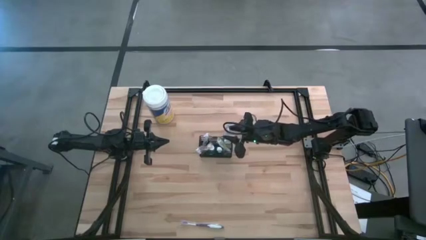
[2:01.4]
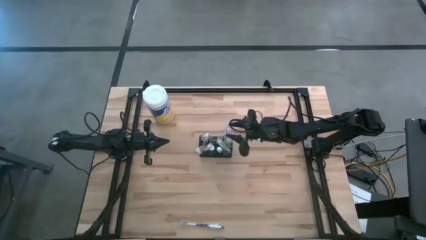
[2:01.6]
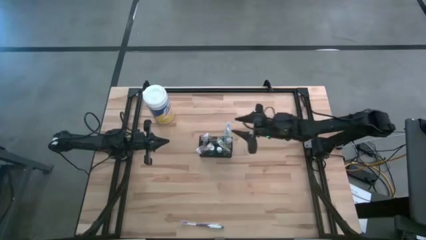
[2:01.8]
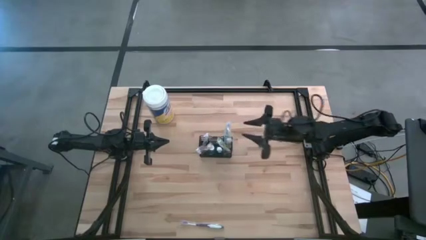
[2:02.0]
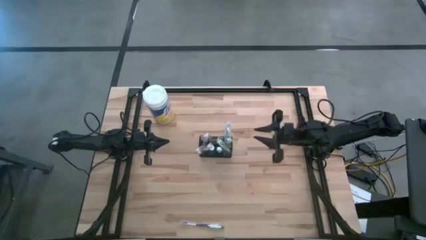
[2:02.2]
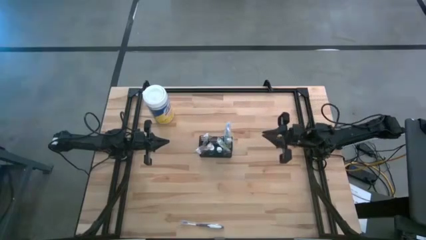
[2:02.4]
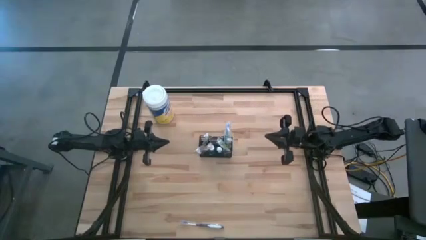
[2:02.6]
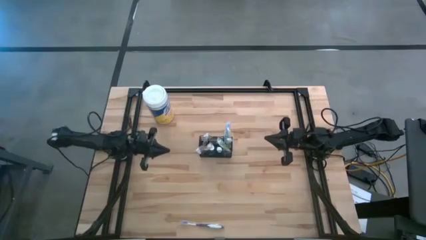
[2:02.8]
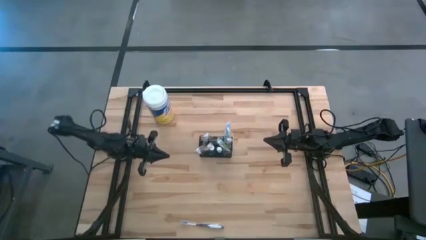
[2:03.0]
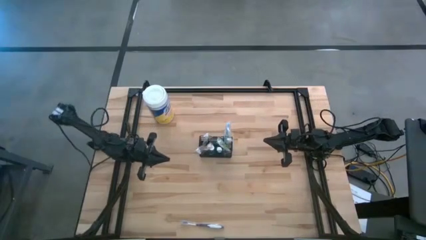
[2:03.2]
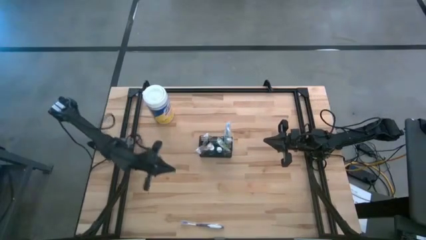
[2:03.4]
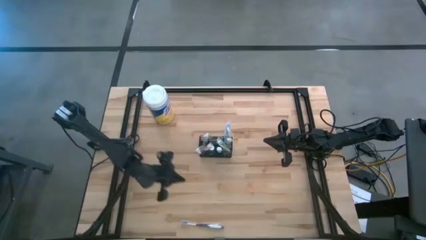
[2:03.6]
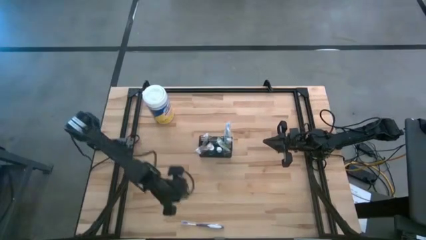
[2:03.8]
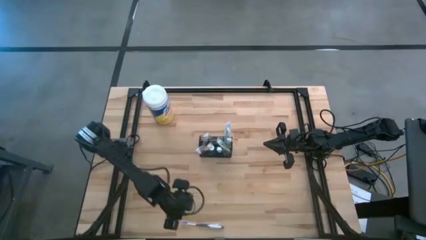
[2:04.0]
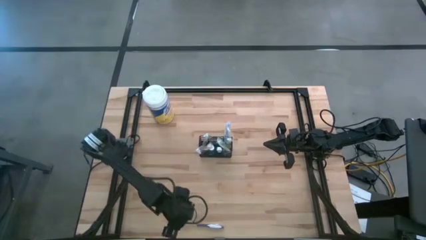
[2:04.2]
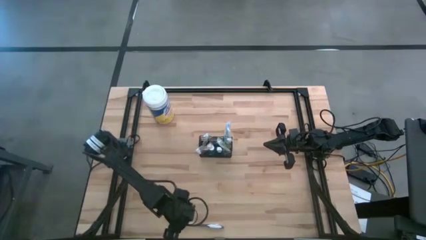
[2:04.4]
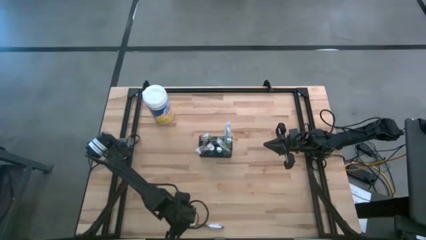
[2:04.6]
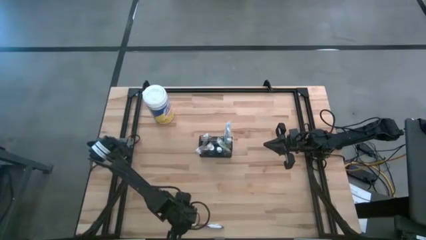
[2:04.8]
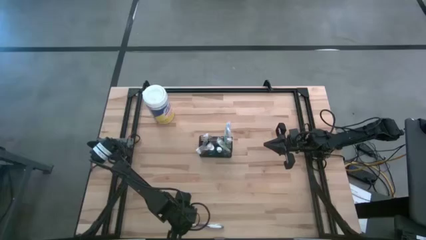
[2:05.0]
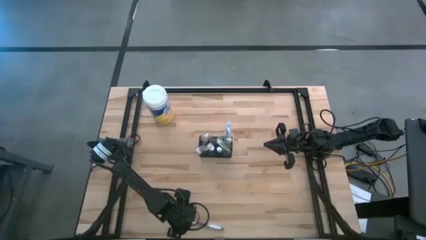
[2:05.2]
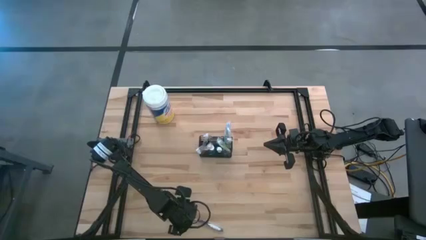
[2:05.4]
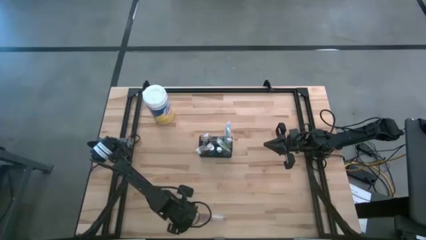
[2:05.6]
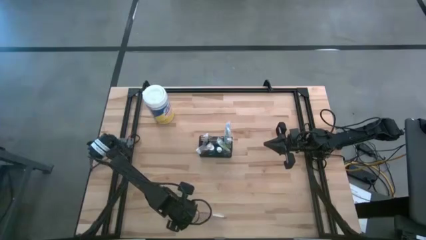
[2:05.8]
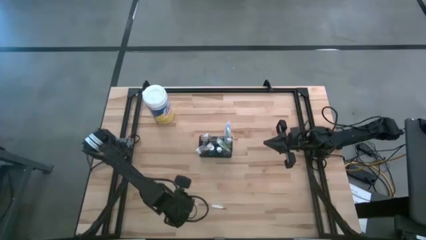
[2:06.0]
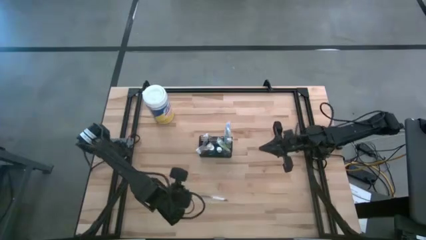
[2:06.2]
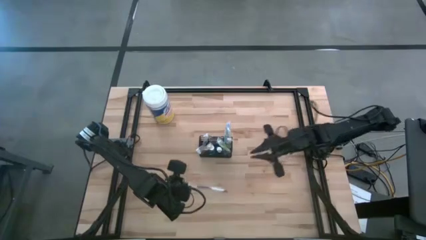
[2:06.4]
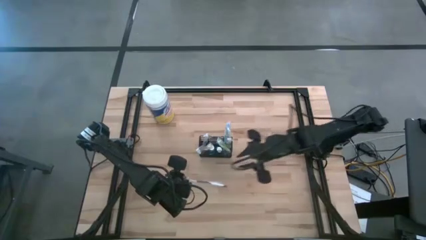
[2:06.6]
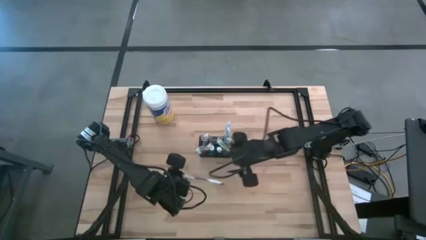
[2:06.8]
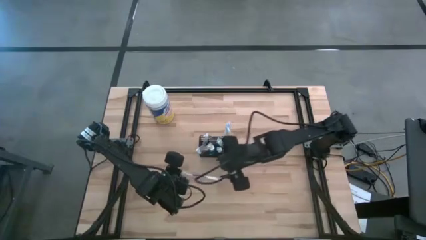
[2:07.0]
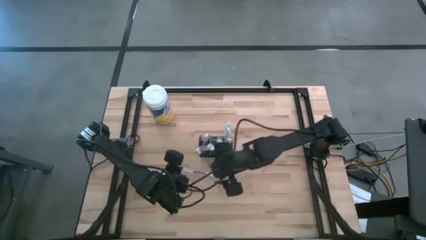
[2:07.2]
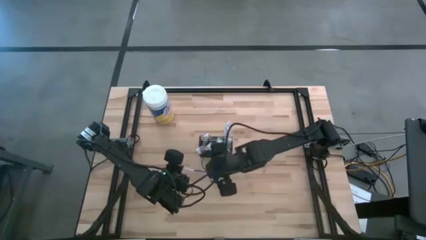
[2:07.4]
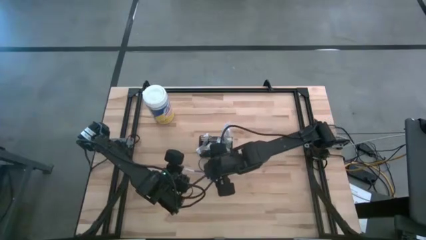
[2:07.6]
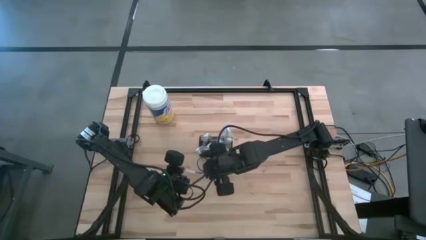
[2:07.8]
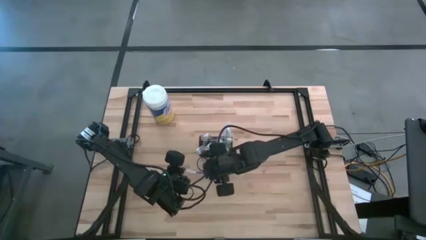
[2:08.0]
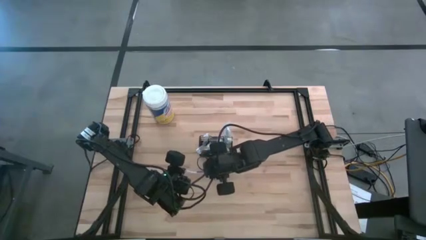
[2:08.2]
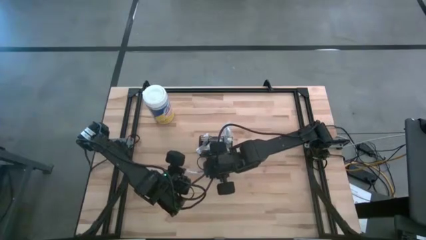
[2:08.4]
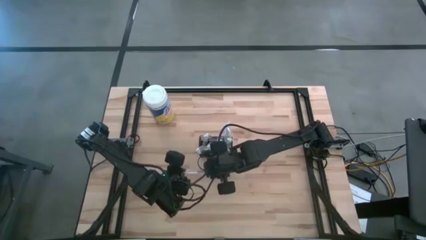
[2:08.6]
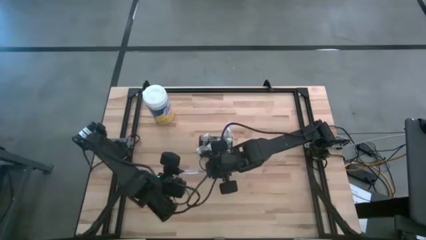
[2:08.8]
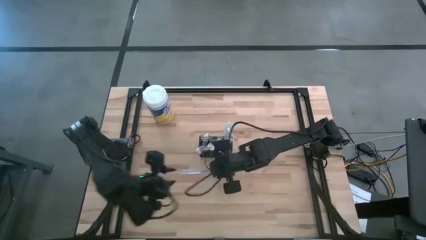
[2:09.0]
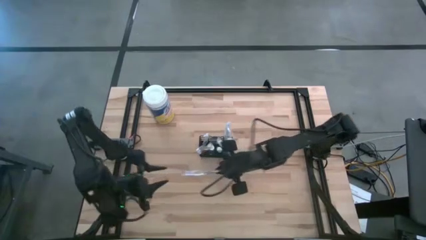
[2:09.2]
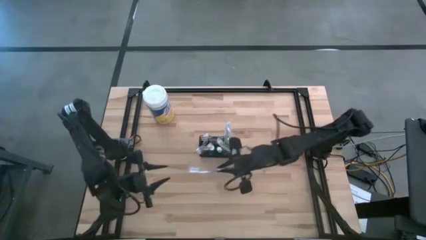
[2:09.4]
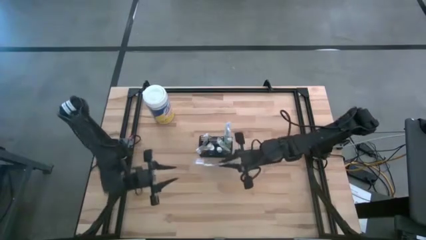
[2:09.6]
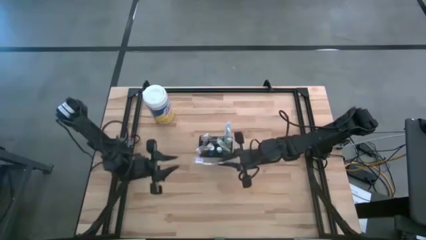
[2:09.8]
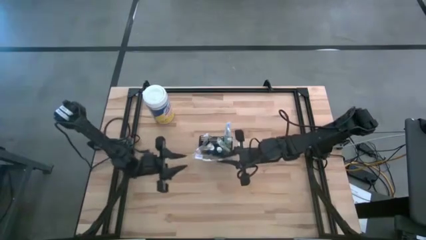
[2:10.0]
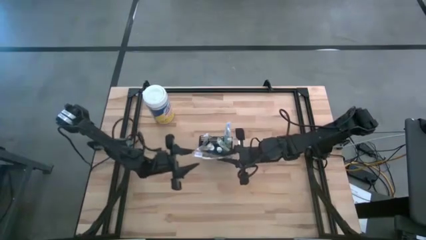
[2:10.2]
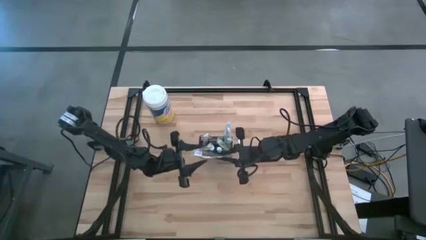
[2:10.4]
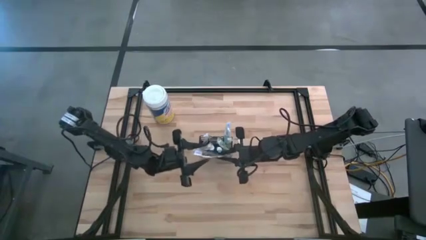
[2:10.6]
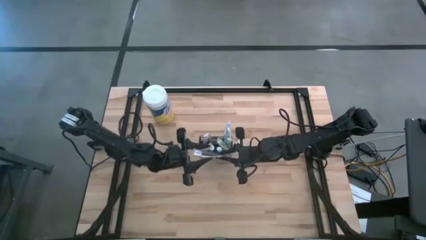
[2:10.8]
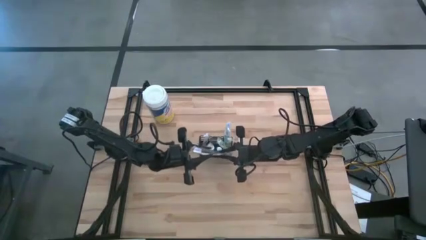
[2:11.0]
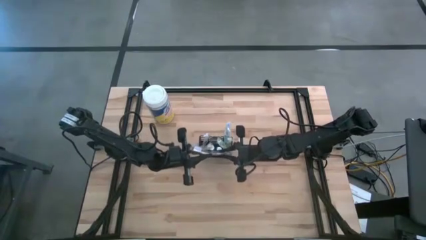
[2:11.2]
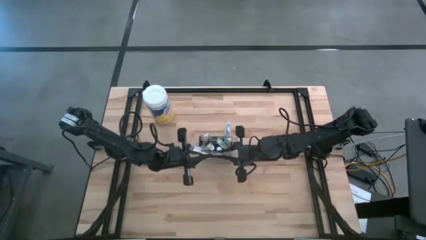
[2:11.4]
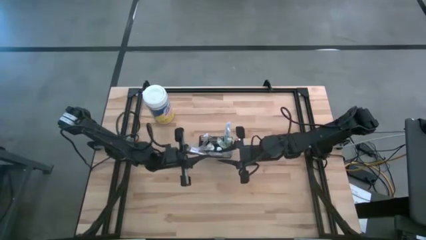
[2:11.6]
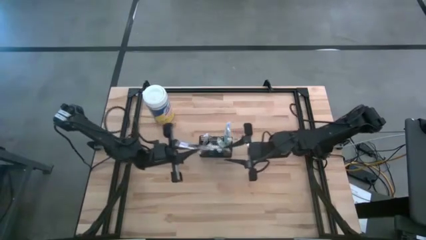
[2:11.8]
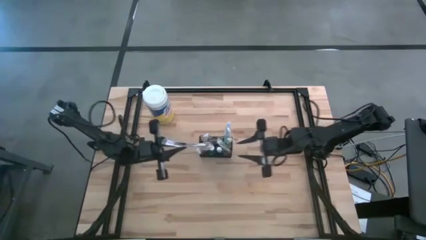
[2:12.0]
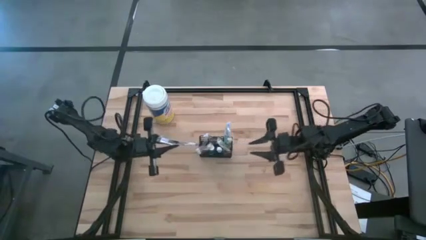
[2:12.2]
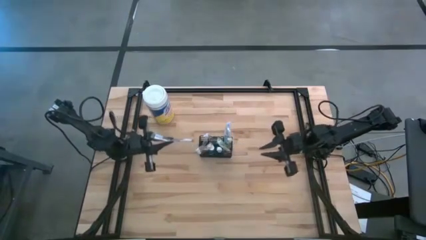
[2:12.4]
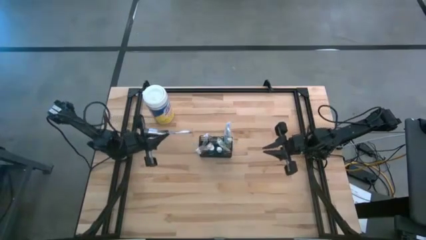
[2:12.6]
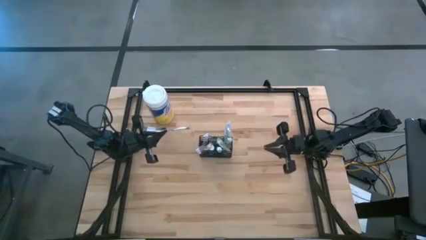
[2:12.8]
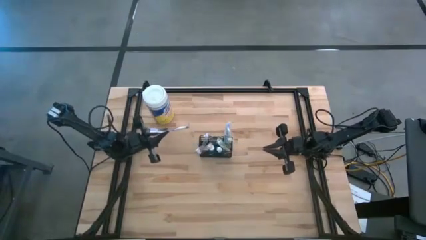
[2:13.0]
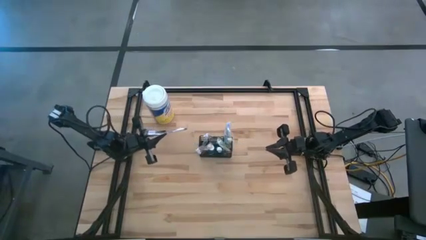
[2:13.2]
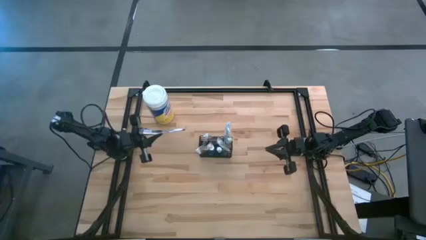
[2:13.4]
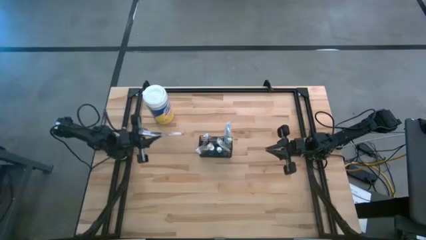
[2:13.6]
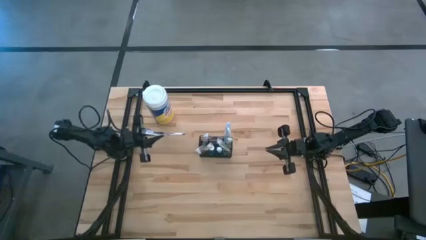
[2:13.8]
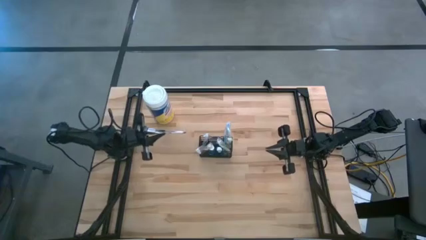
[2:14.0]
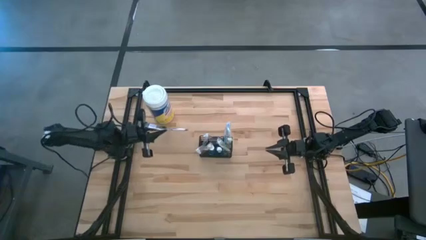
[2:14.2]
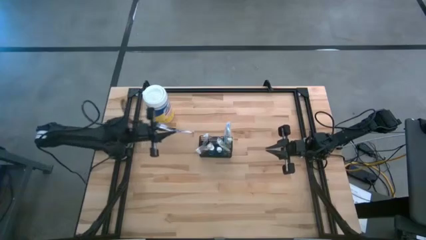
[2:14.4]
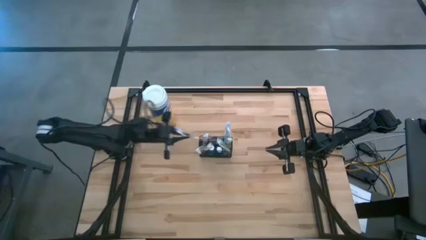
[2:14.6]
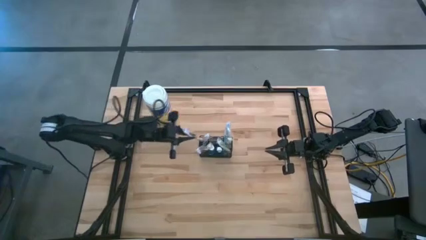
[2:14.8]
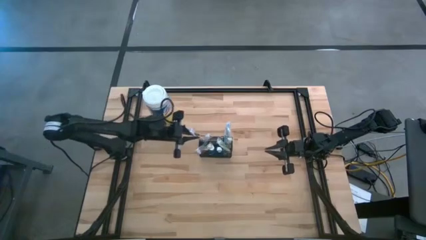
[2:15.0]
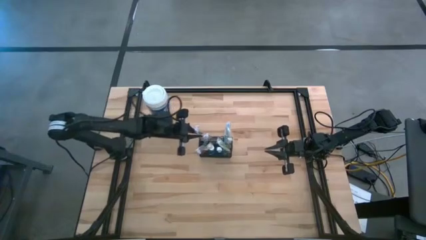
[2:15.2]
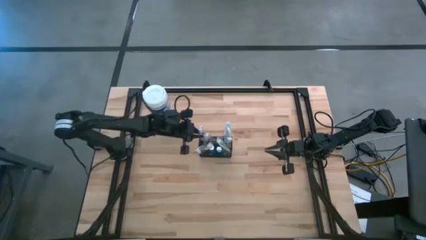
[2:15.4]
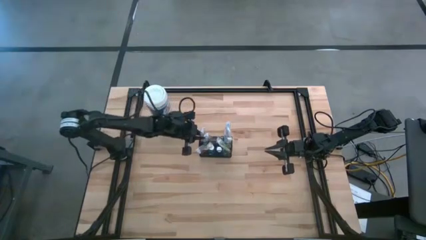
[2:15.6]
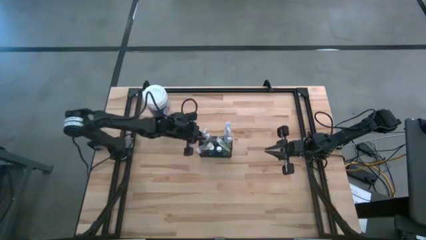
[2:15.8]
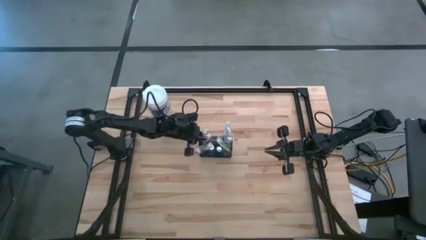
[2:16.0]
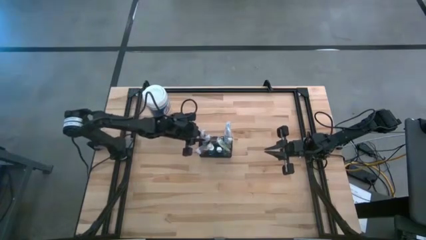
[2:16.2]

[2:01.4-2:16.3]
Task: Pick & Place toothbrushing station
Put the purple toothbrush into the wire organizer

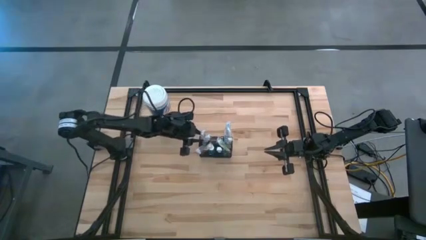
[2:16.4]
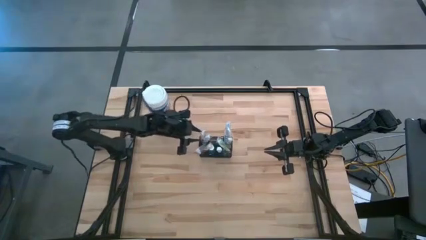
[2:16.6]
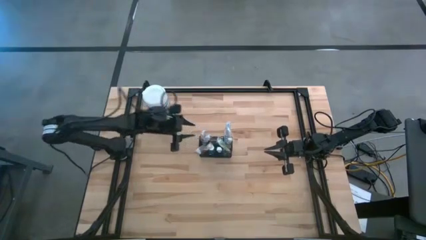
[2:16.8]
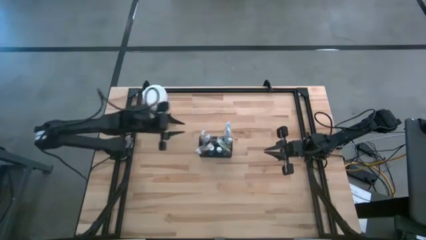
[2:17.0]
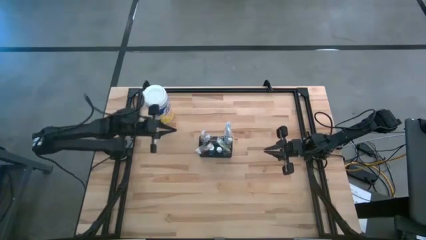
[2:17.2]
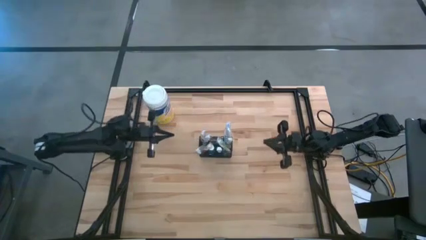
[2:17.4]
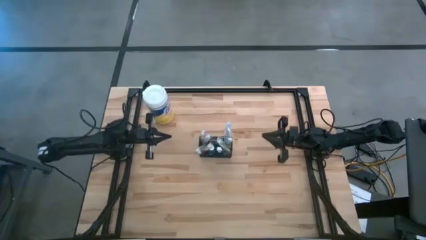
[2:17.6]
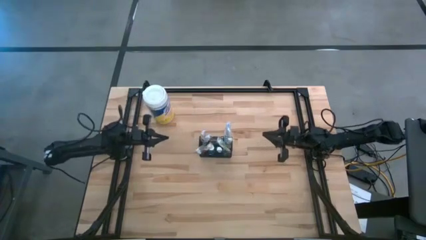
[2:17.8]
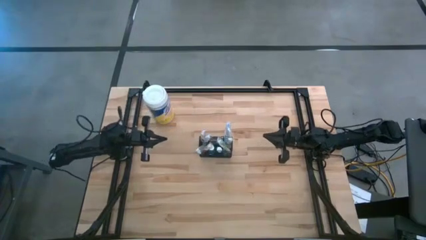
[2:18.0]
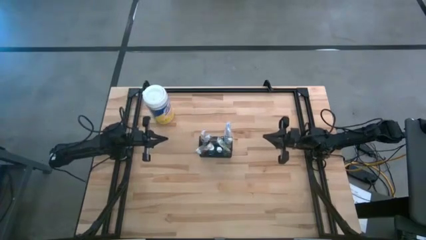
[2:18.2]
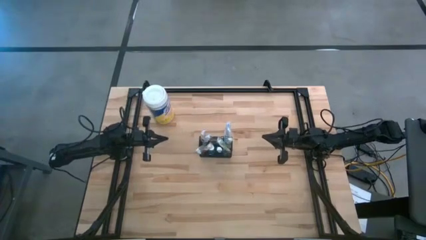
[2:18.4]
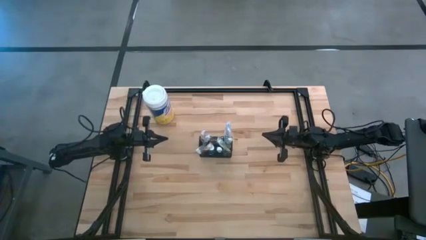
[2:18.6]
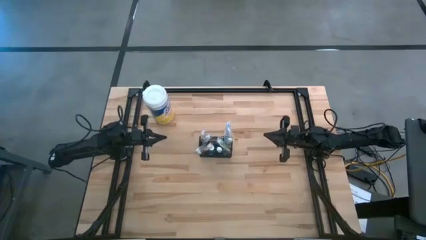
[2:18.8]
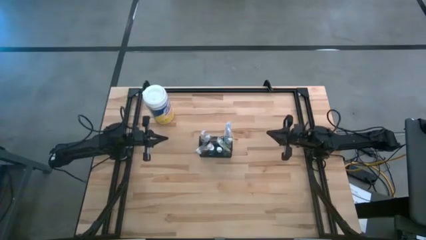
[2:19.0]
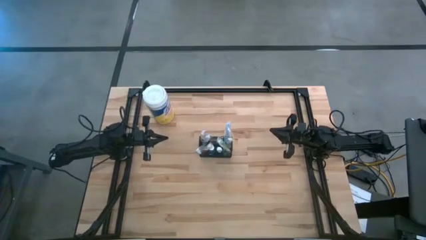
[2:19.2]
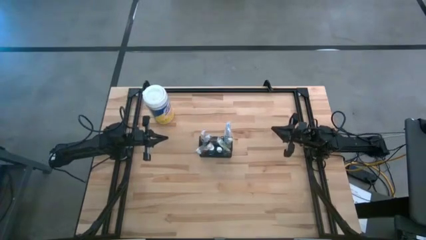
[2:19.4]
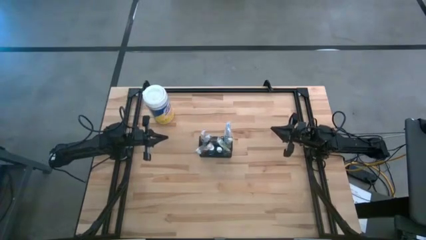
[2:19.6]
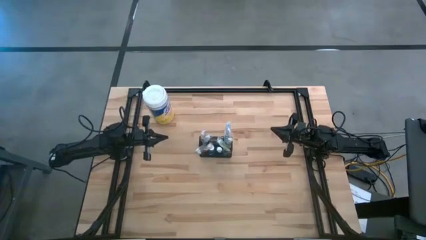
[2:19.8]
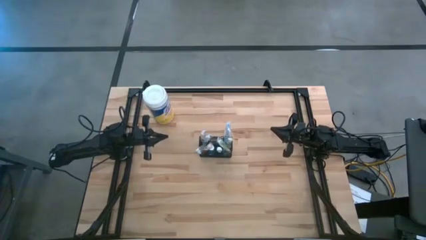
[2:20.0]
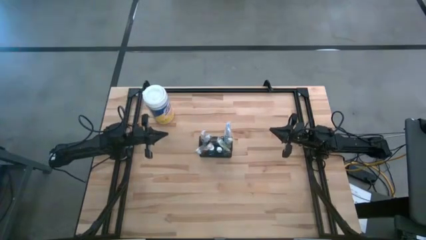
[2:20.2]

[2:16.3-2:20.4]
Return to Home Position
